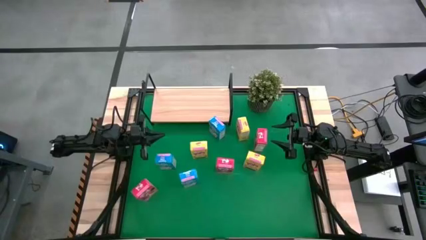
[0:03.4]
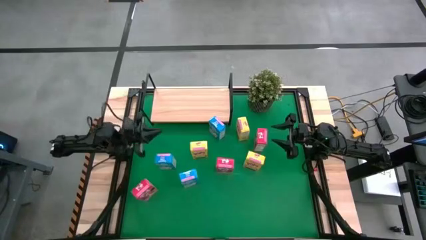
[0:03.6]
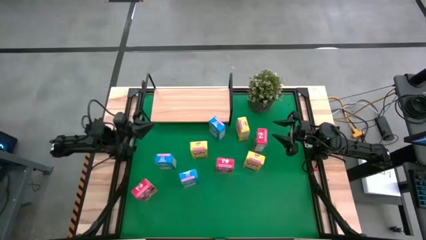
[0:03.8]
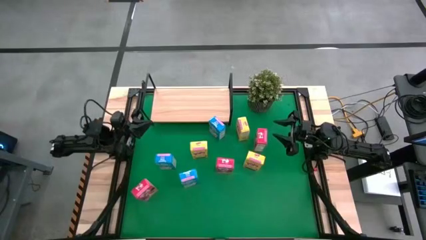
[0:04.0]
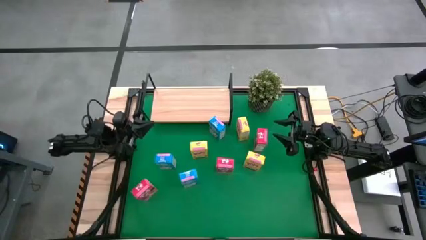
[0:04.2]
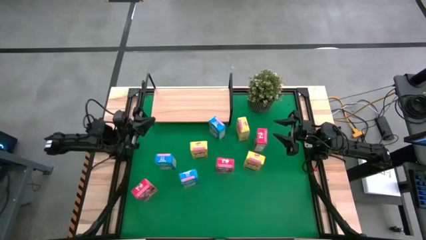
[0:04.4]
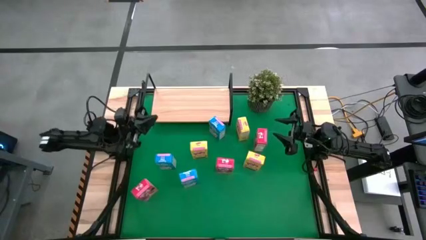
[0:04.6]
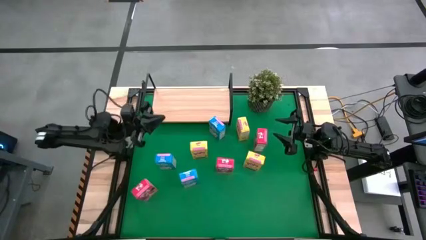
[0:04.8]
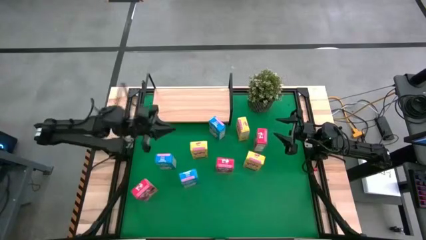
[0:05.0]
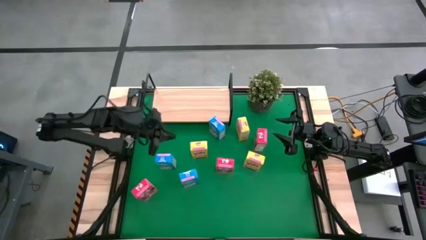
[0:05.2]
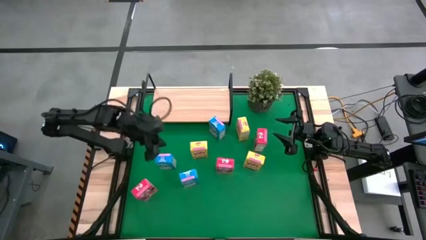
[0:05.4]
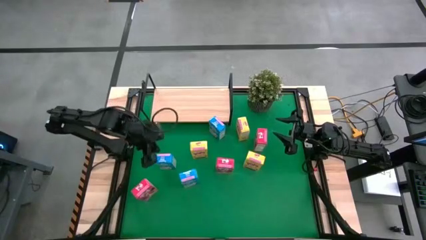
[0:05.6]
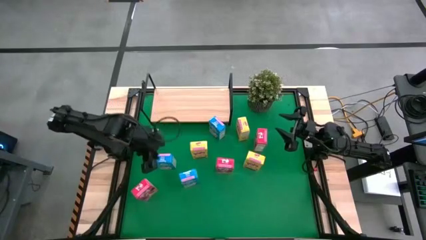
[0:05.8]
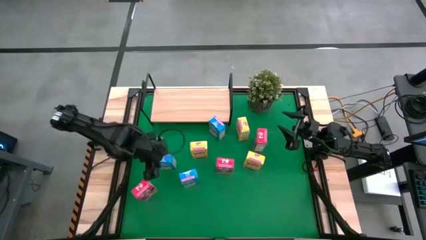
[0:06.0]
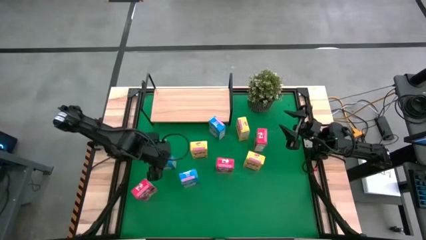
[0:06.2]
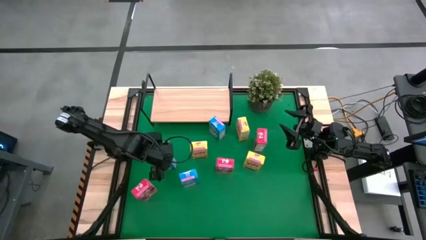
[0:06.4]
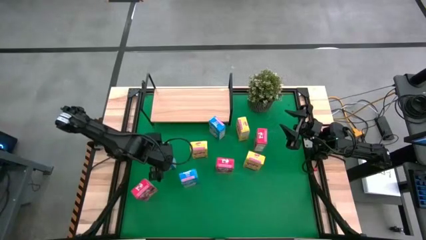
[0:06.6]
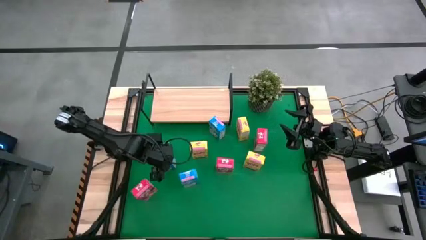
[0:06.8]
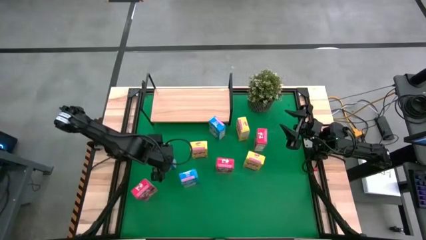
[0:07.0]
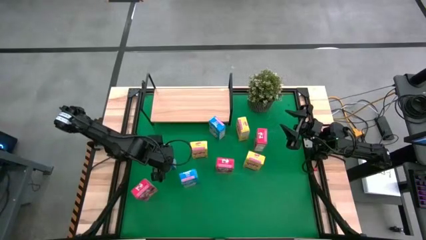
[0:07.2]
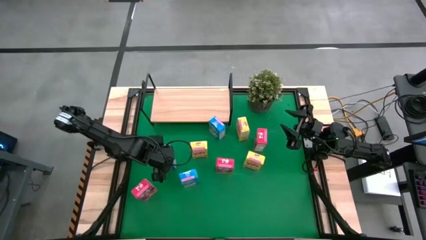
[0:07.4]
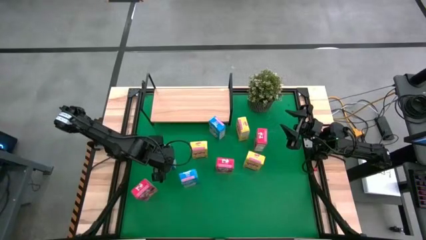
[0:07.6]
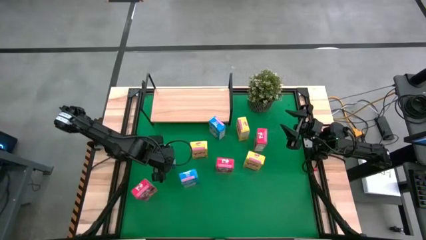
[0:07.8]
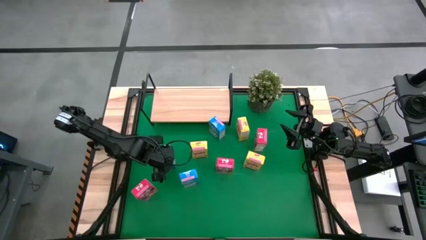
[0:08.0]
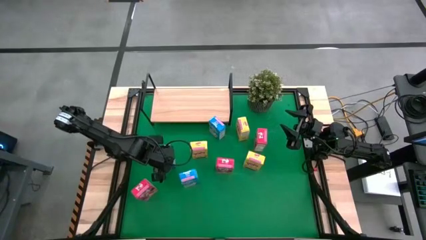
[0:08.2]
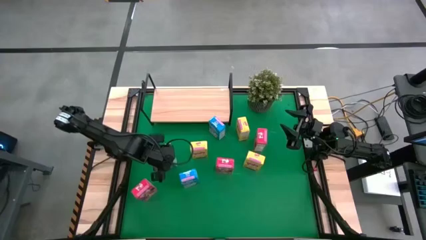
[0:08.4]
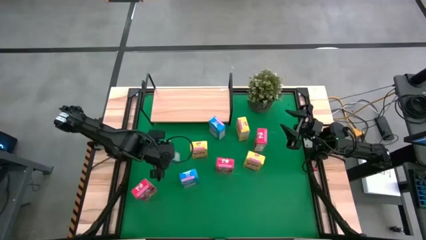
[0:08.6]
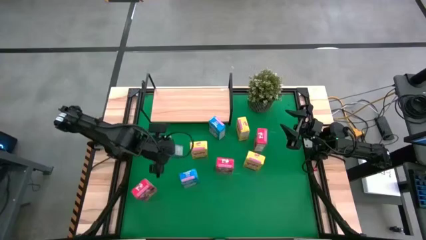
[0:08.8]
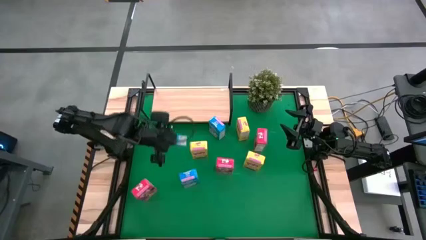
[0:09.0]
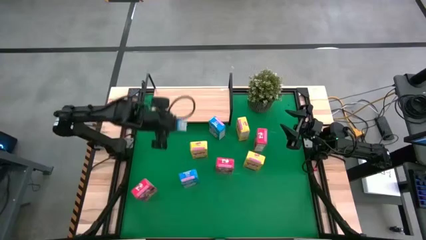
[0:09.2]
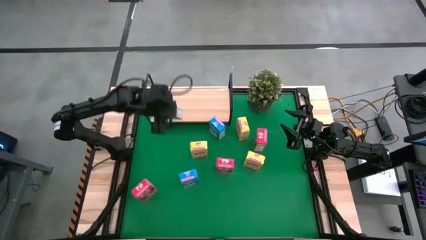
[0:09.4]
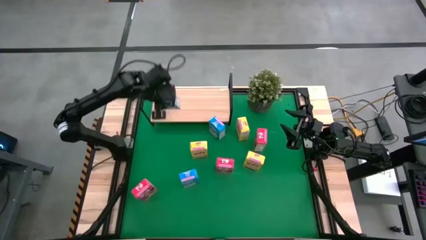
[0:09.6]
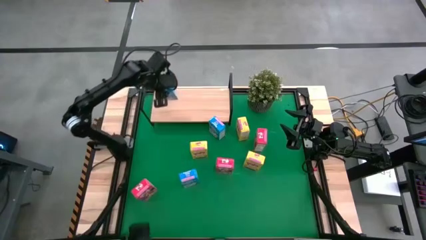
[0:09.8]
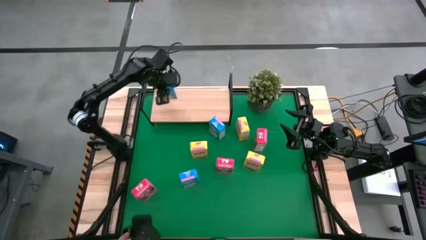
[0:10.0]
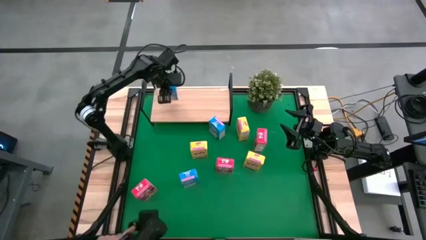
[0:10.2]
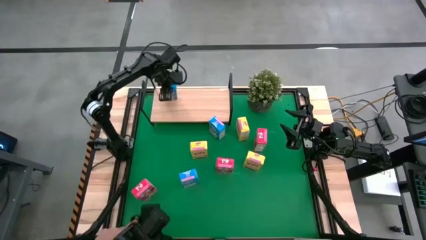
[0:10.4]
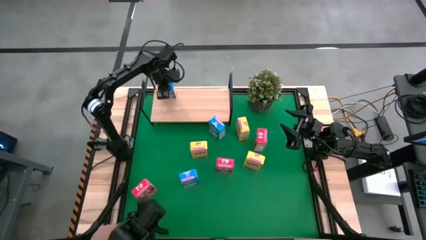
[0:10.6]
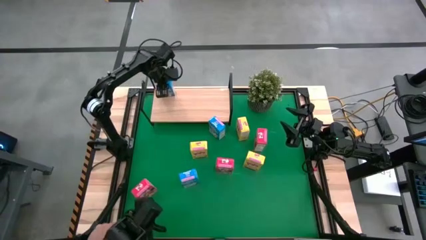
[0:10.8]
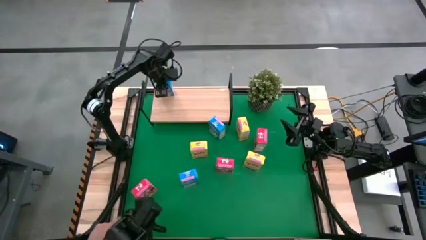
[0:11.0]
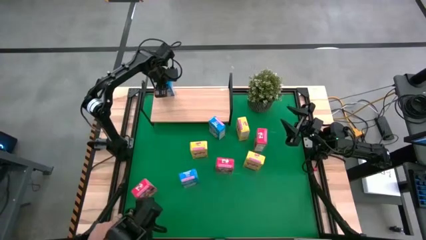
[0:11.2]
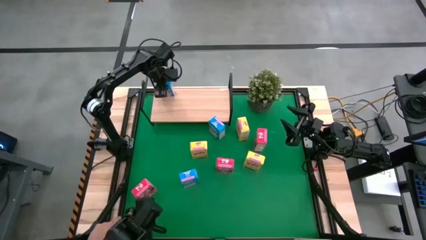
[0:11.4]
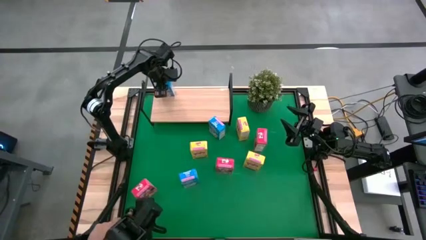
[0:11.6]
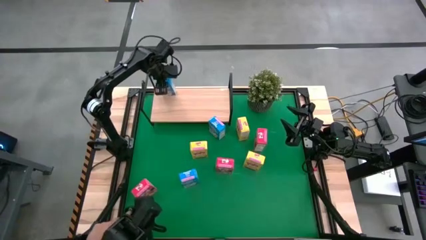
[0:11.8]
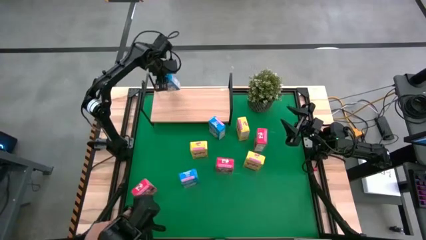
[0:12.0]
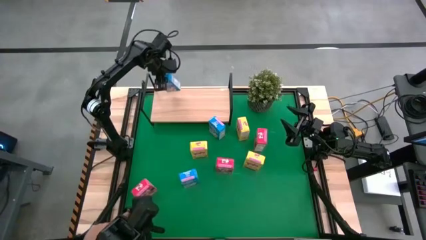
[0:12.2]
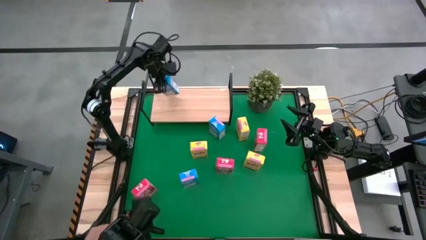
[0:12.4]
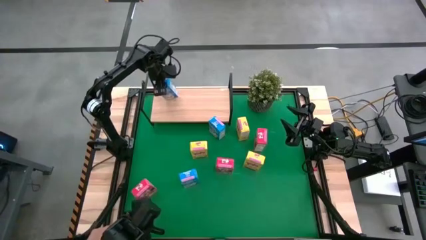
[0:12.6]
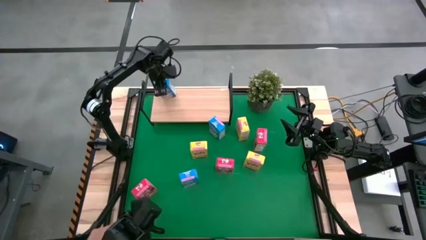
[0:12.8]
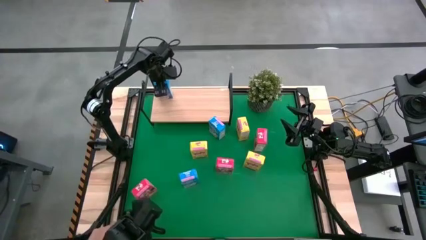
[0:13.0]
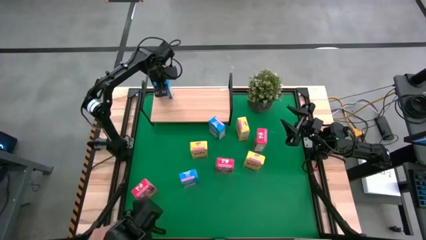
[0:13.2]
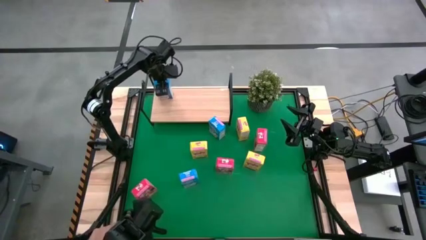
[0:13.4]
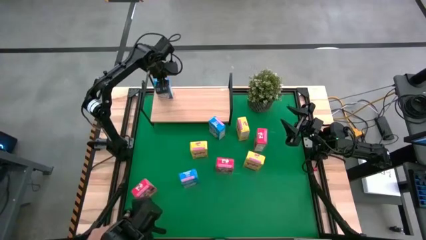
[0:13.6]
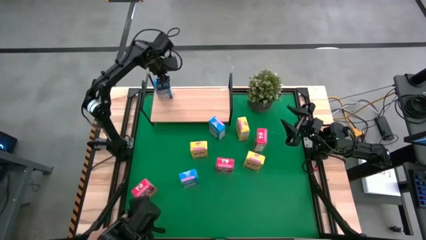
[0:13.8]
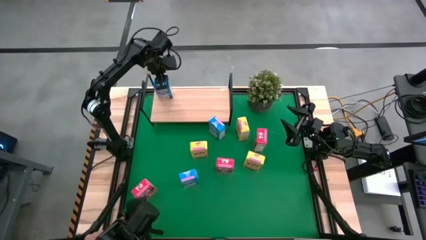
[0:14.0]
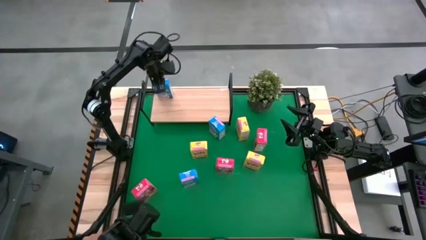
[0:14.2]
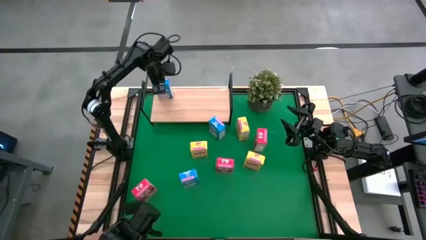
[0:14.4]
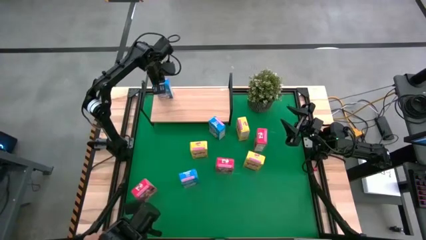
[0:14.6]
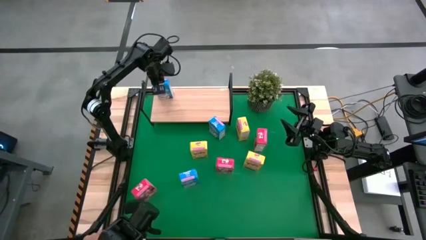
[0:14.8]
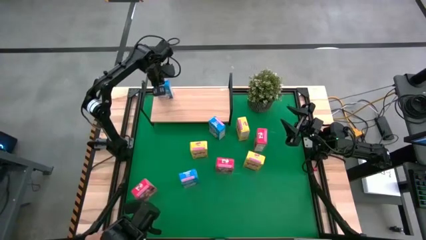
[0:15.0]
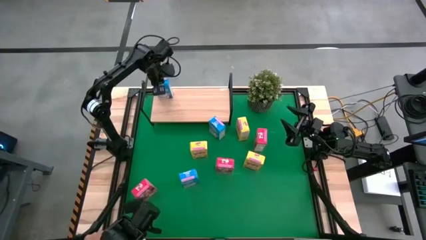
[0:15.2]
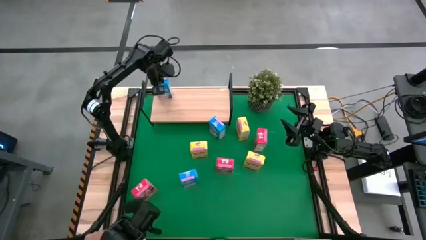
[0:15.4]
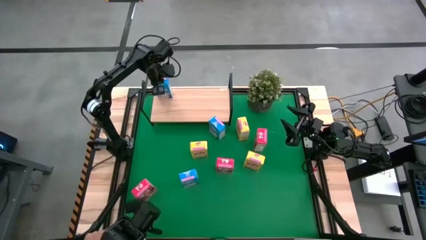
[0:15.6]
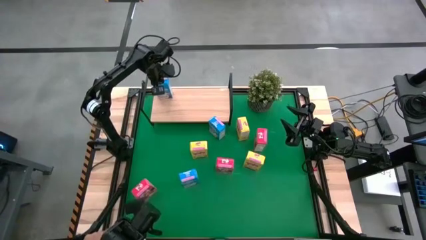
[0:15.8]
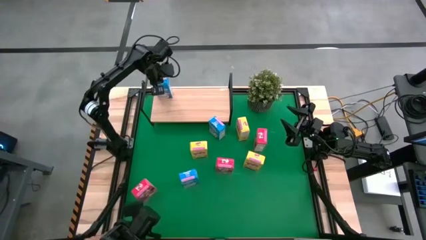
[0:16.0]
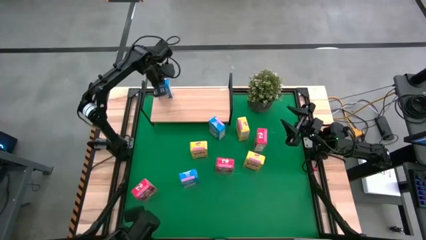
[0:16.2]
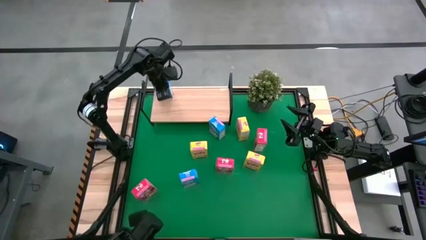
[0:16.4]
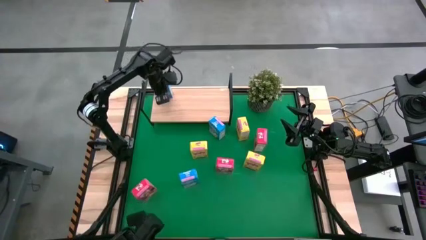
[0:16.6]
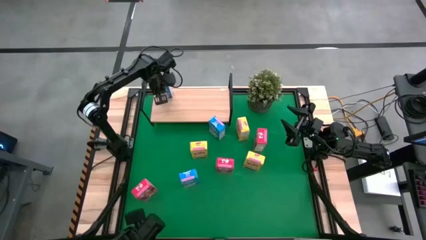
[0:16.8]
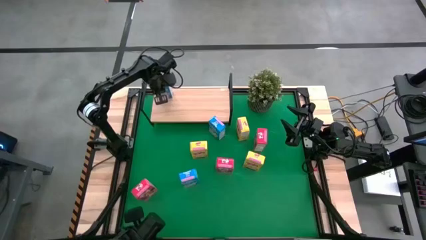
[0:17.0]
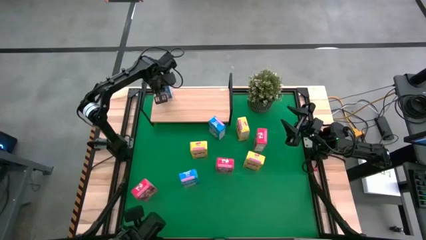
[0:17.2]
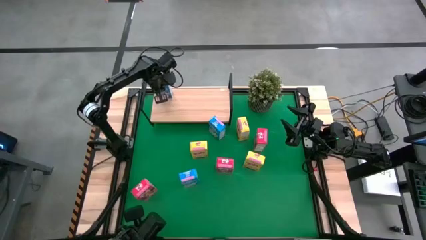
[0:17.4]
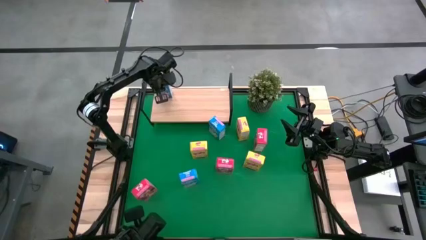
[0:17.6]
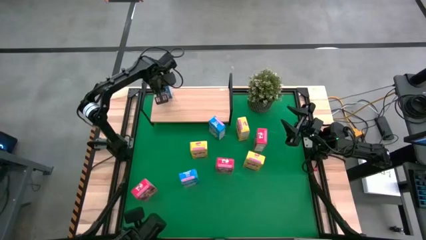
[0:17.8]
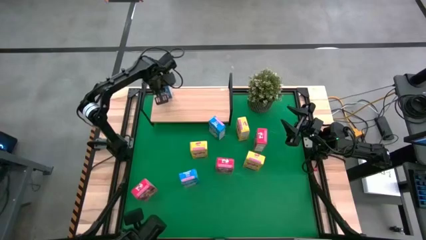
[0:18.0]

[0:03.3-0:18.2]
Task: Stack cereal on shelf
Put the left blue cereal box on the shelf
